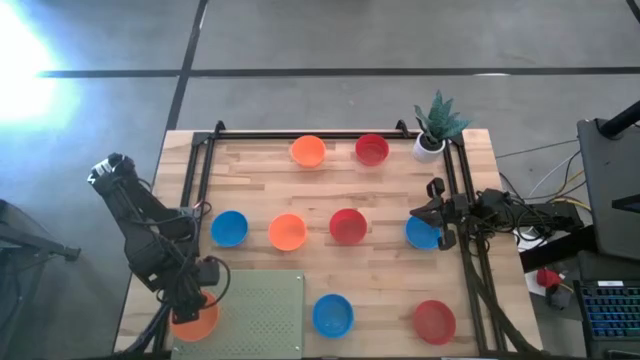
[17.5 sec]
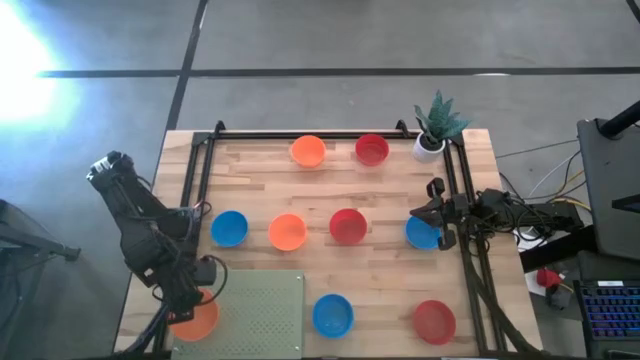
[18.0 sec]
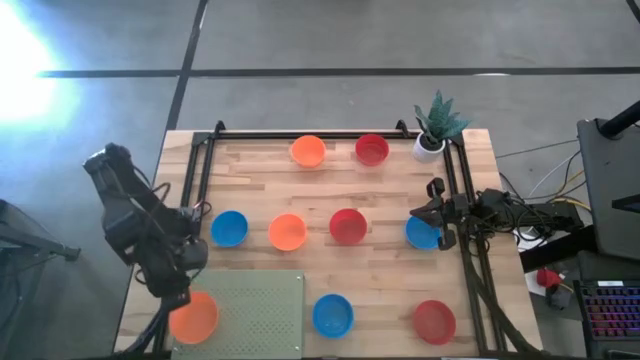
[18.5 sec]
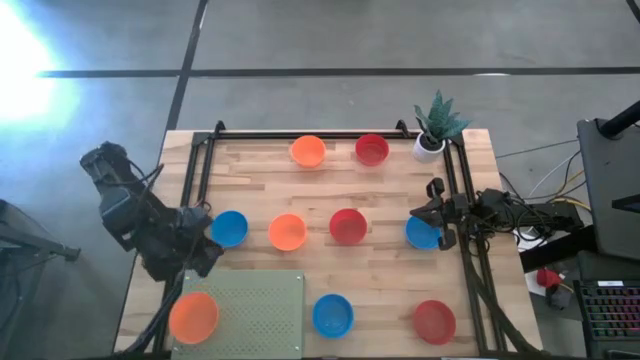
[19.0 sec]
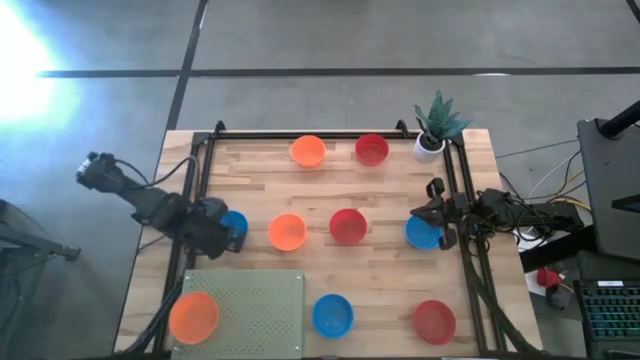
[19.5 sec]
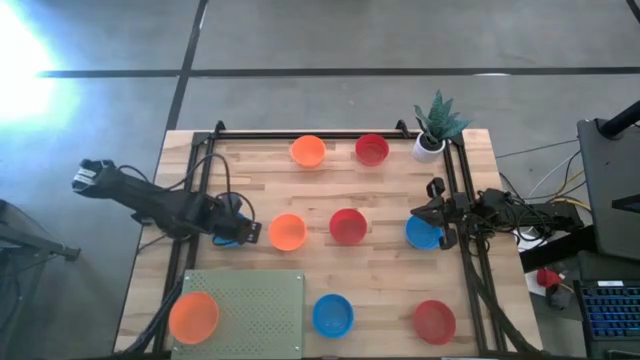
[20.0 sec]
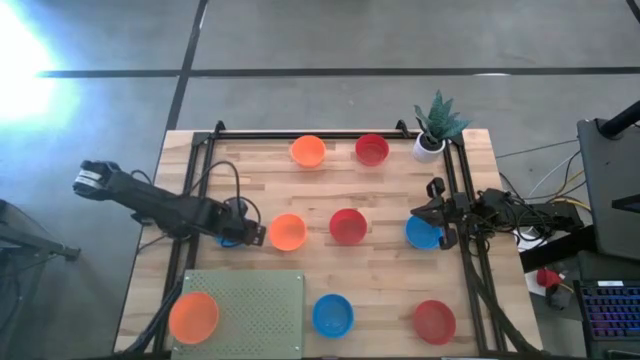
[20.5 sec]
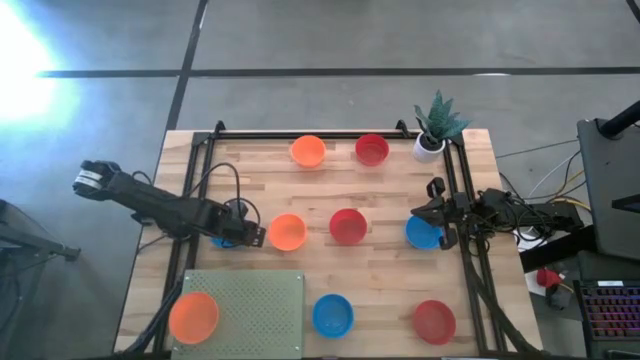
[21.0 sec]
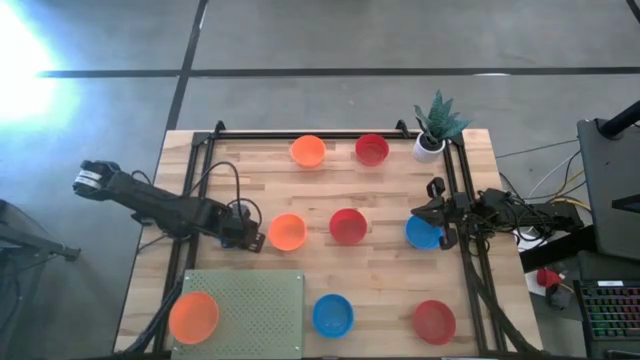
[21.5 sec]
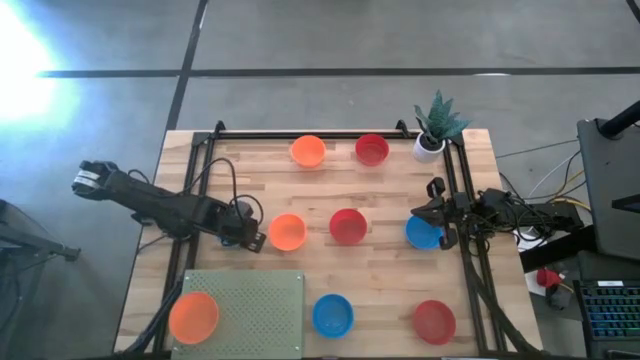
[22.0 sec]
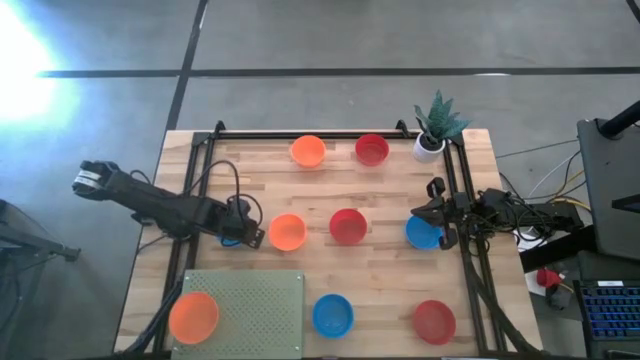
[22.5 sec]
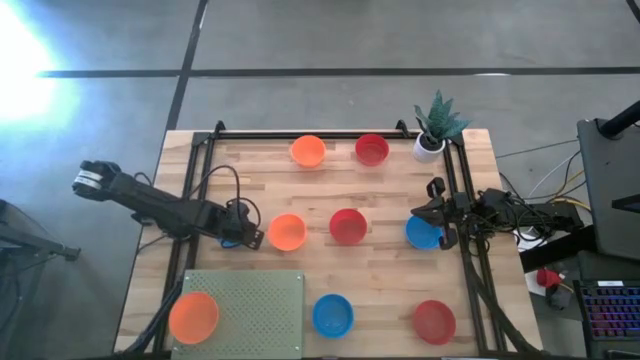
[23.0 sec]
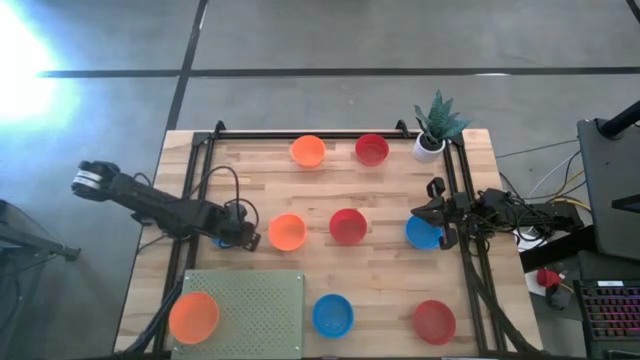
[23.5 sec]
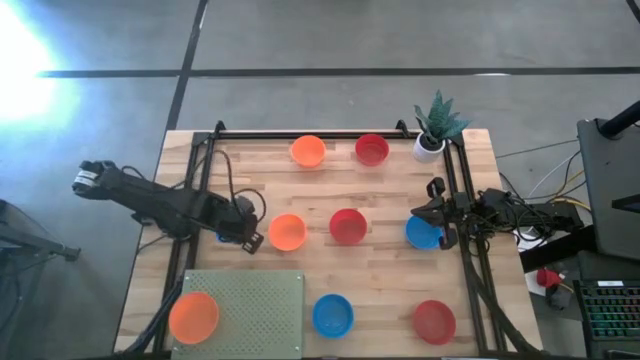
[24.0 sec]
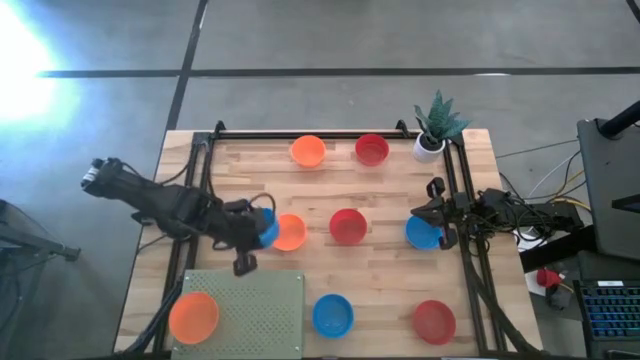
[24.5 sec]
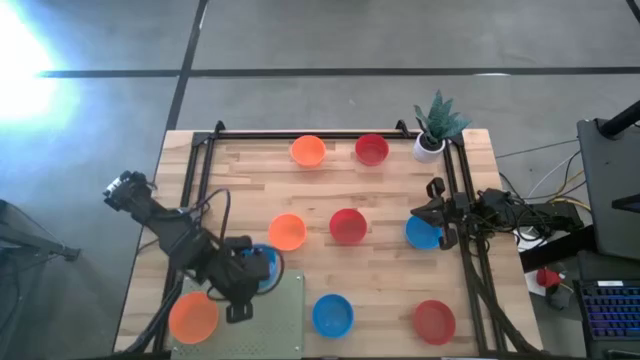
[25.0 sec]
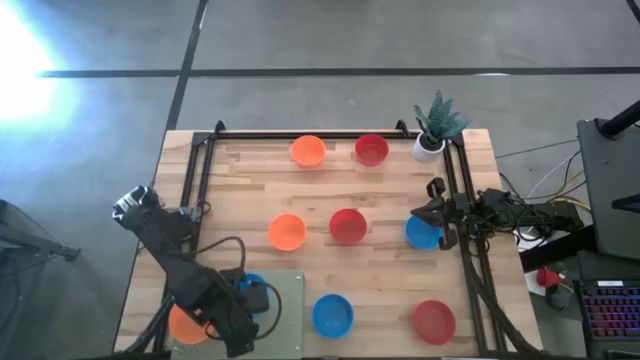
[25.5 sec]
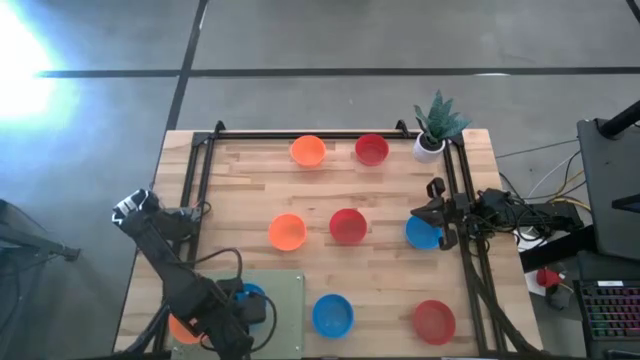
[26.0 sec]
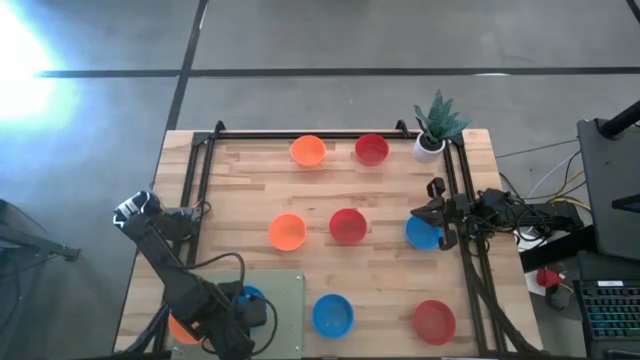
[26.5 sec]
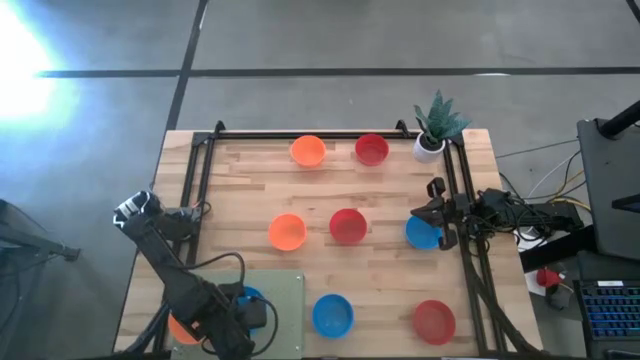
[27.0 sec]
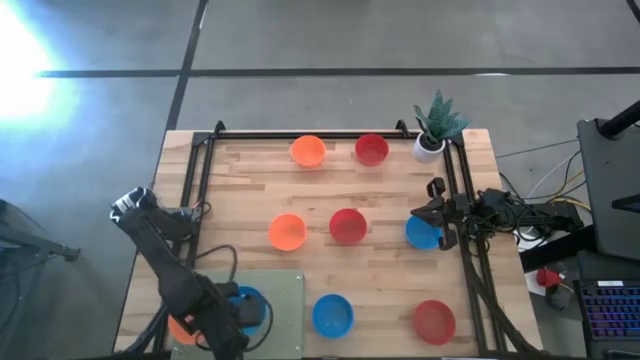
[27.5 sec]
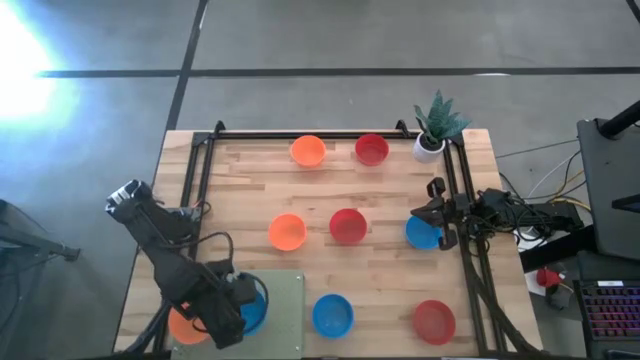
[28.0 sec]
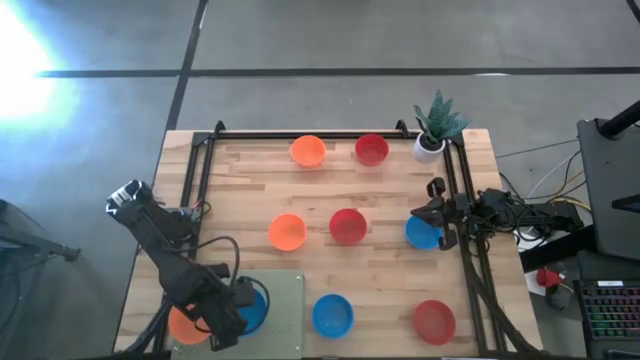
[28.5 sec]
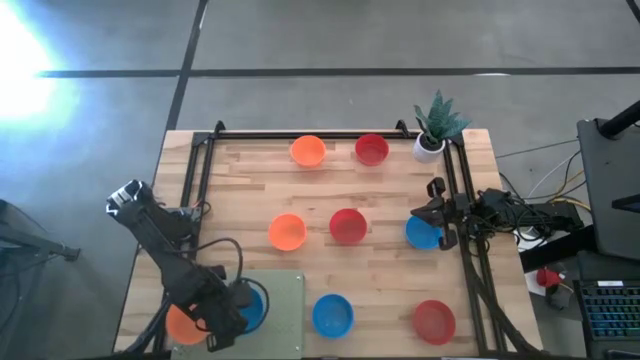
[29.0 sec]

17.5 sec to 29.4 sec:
Task: Pick & Place Mini bowls
Put the top left blue bowl on the shelf

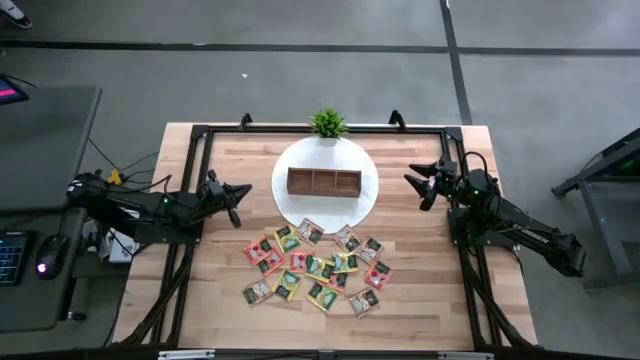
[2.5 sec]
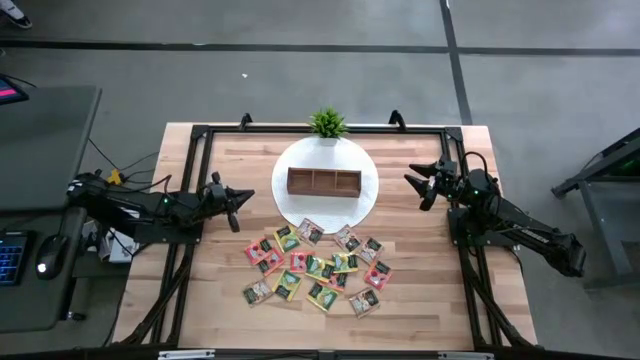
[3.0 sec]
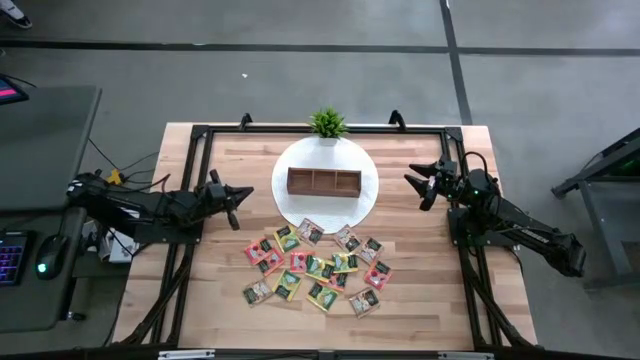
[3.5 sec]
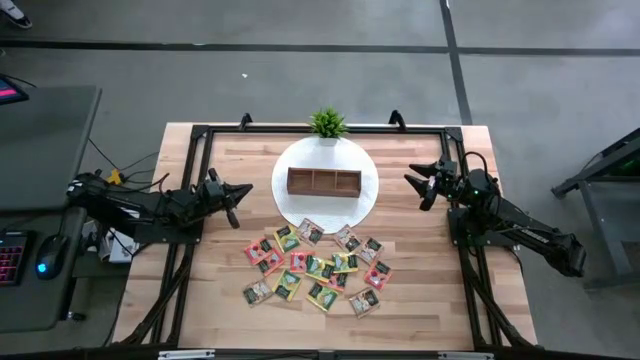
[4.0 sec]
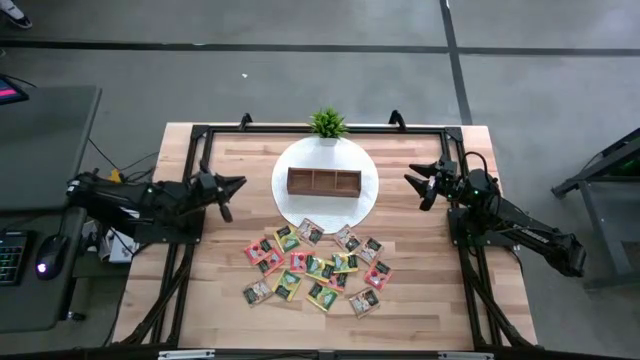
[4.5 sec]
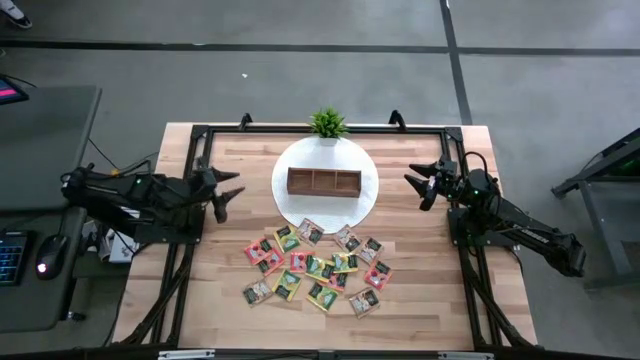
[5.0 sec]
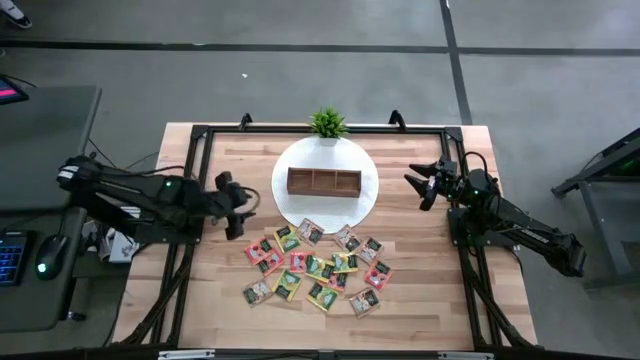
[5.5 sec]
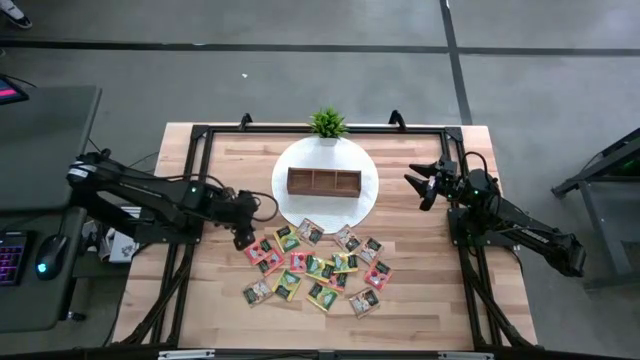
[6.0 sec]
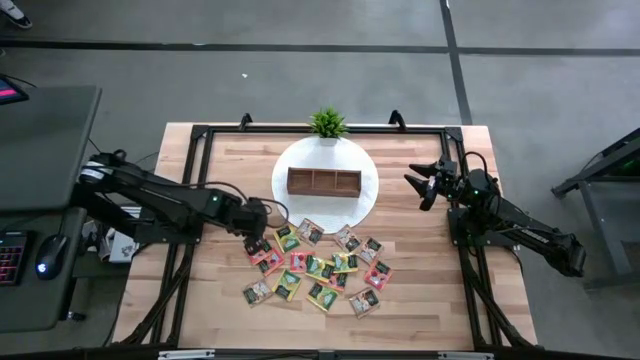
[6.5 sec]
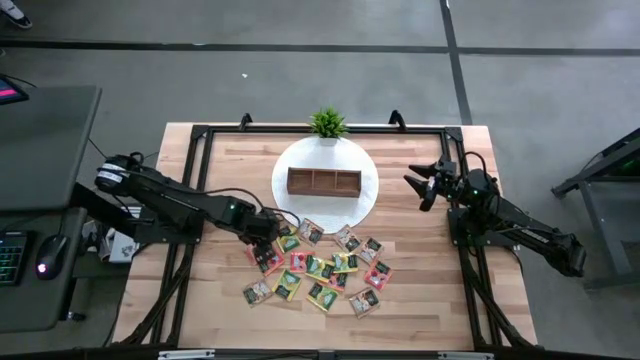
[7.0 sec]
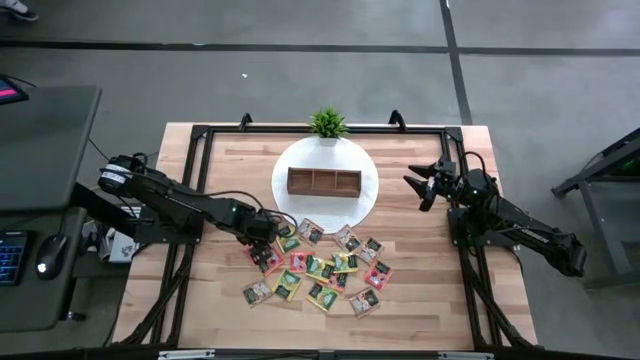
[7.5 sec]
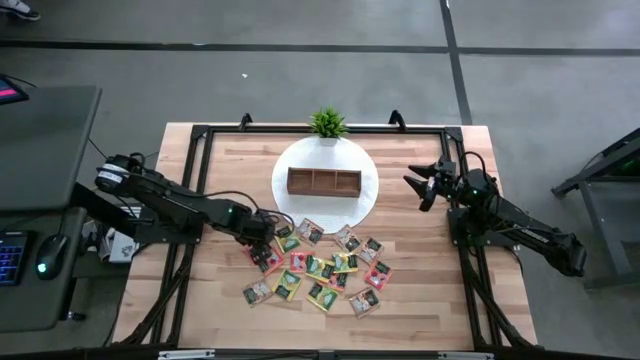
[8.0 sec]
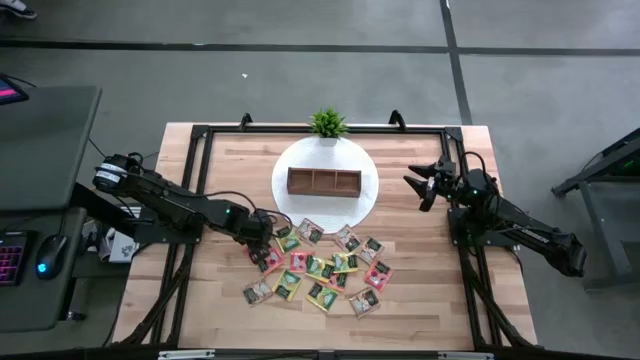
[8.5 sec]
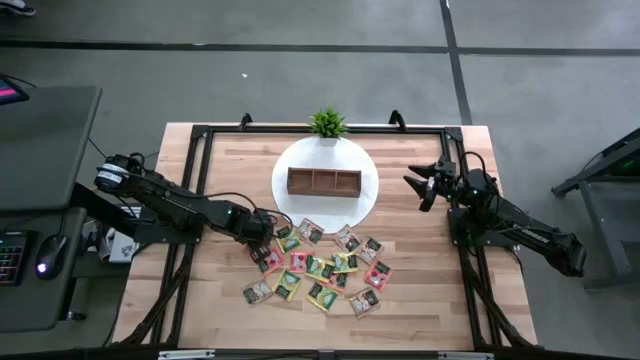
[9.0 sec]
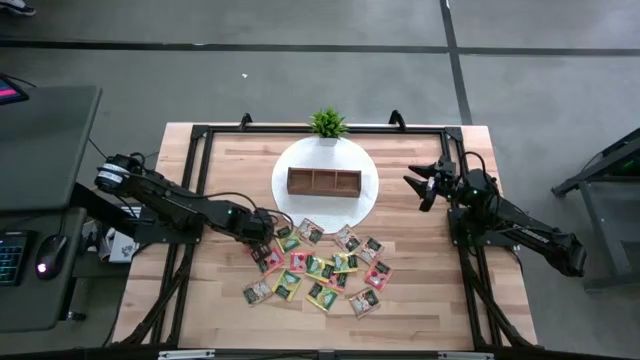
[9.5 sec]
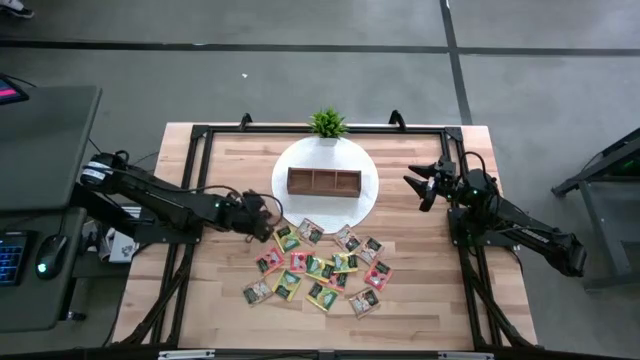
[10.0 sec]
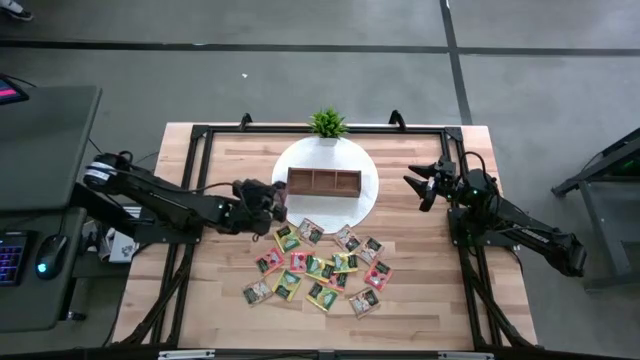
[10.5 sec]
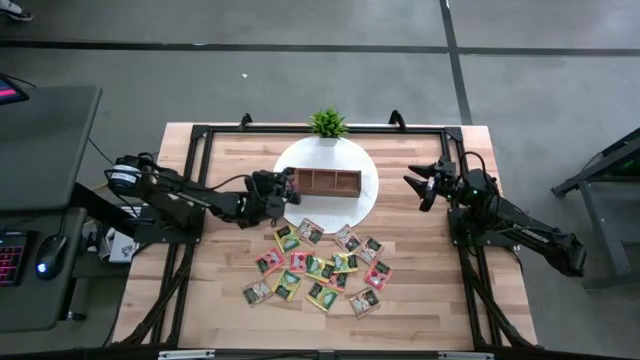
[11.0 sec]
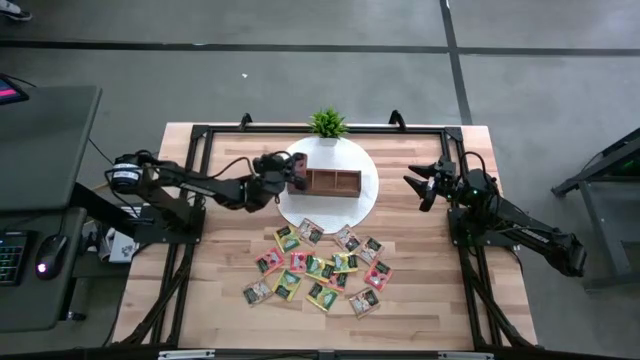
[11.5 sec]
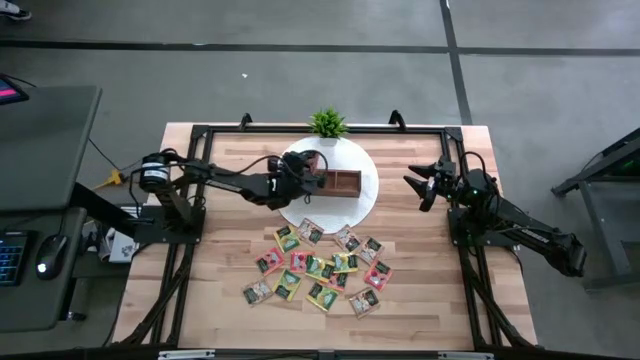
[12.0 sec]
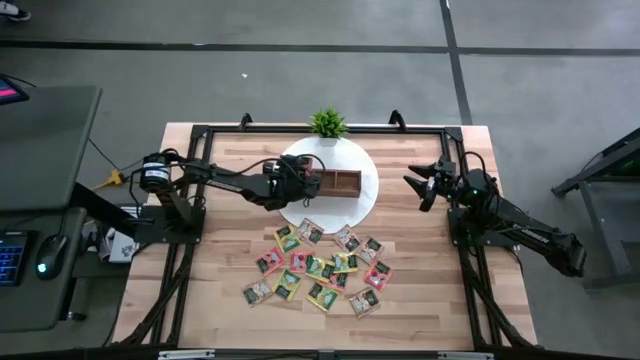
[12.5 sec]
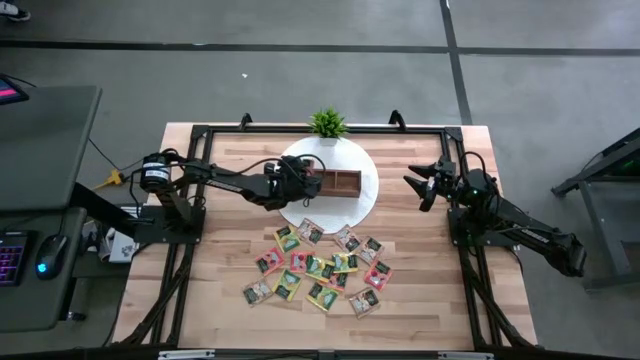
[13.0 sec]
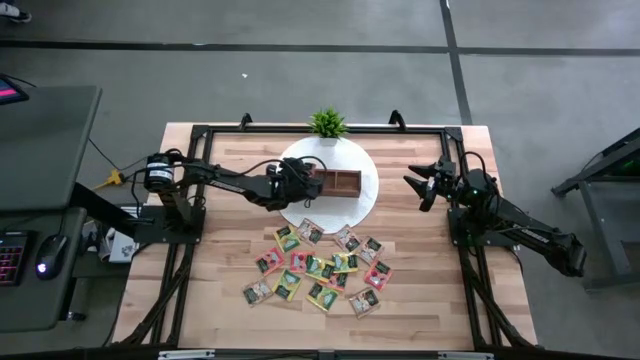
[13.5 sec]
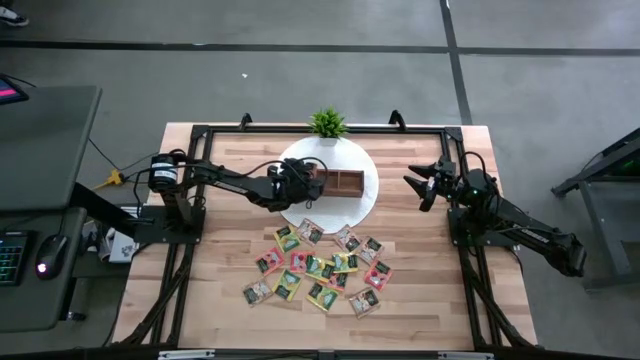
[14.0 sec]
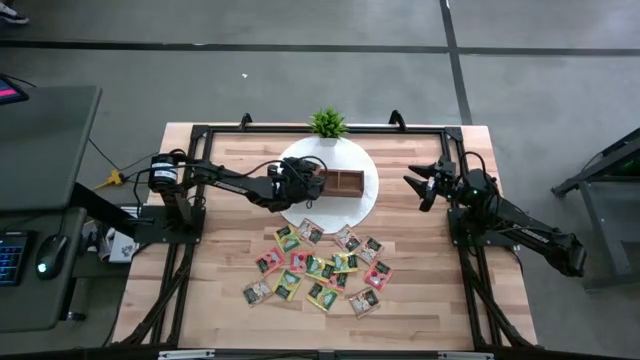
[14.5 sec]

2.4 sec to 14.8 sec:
Task: Pick & Place Tea
Put the orange tea bag into the left section of the wooden organizer
